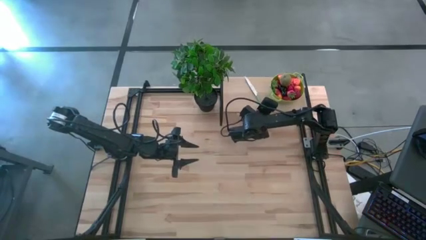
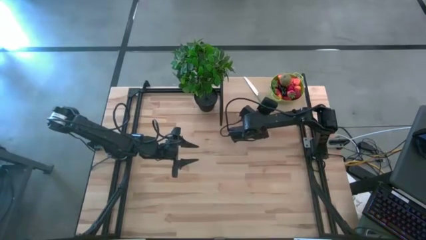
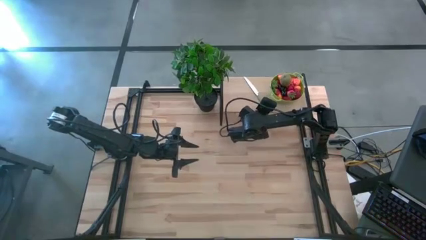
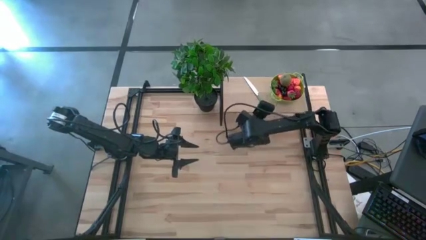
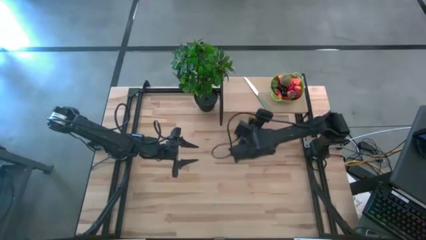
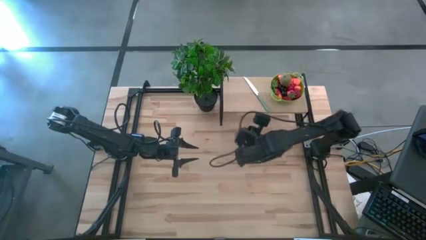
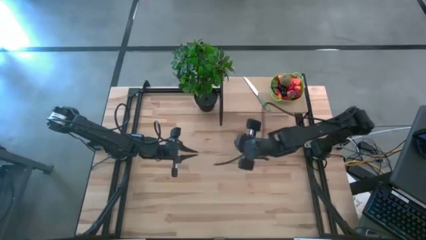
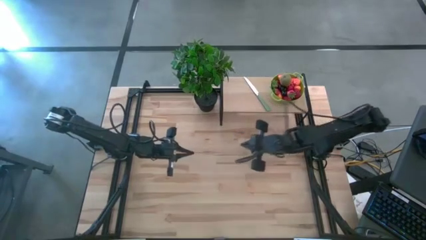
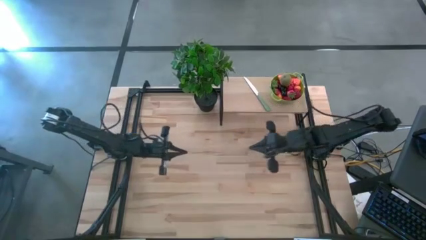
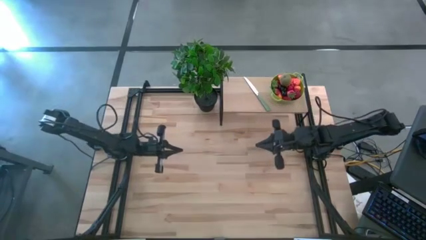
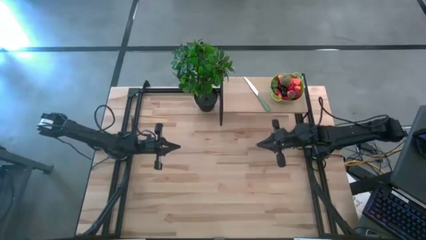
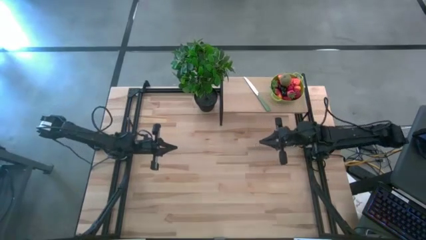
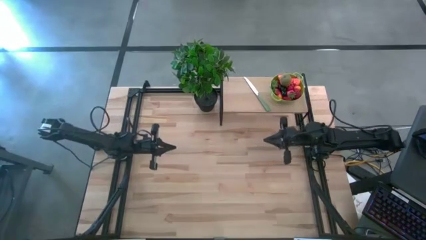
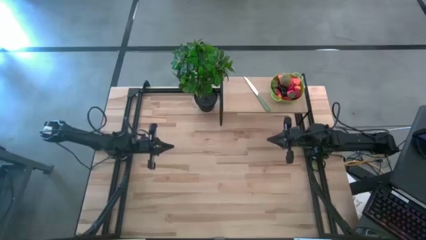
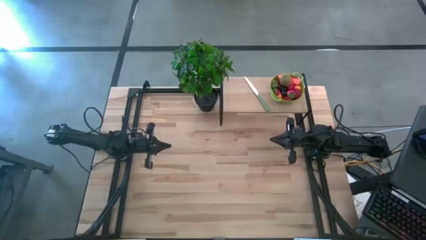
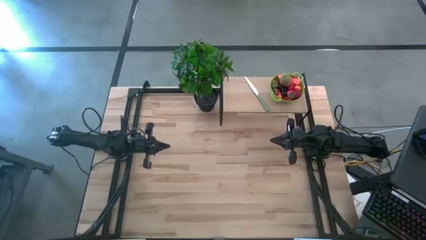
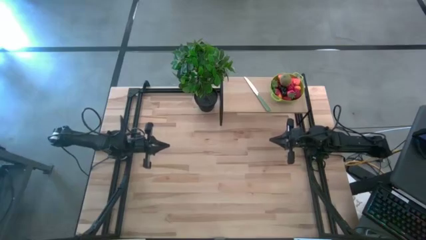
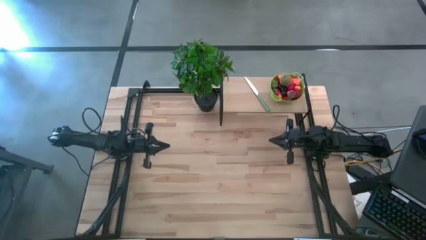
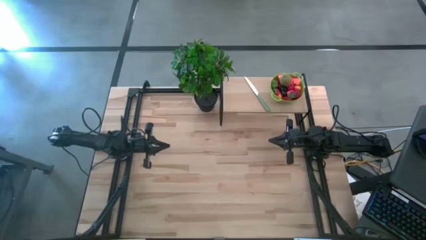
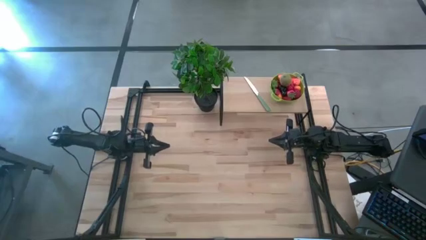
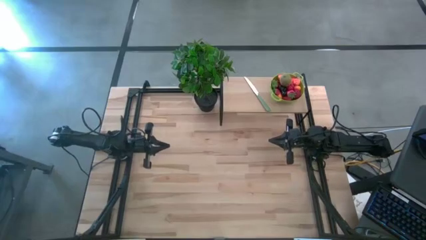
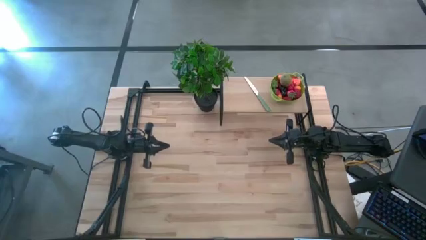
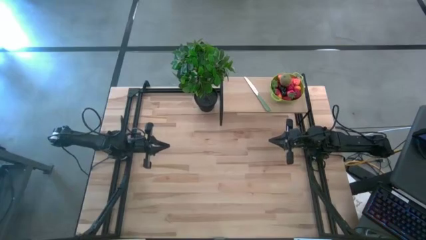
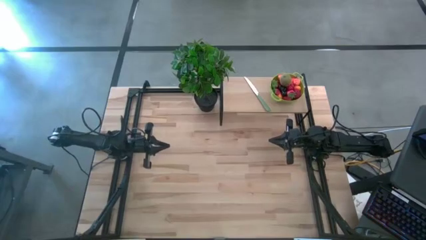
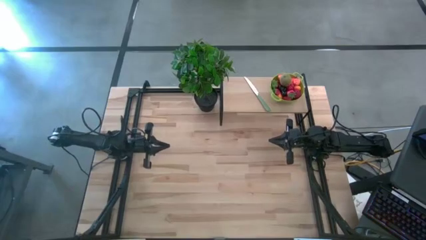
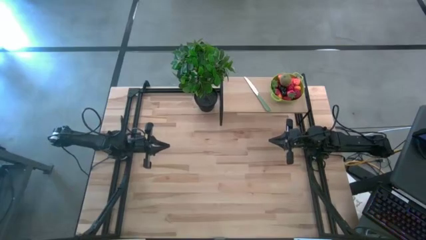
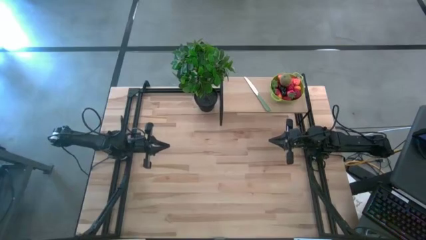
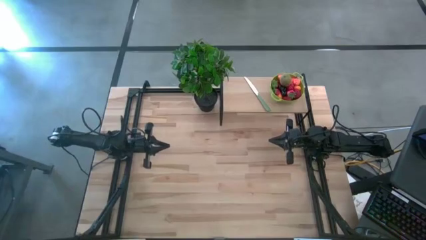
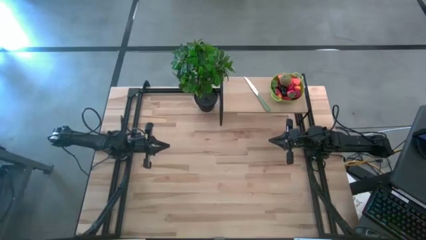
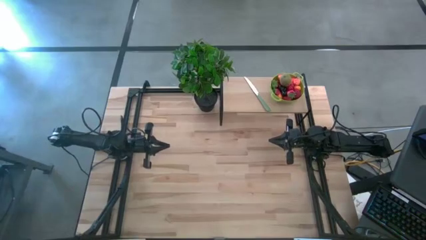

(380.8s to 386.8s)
Task: Pick & Place Fruit
Return to Home Position

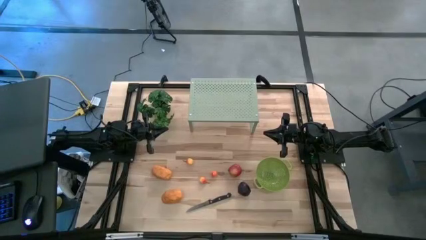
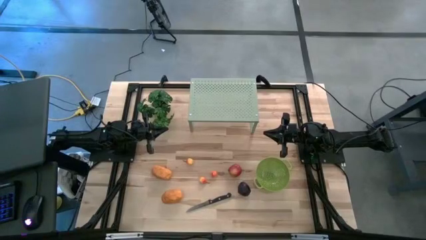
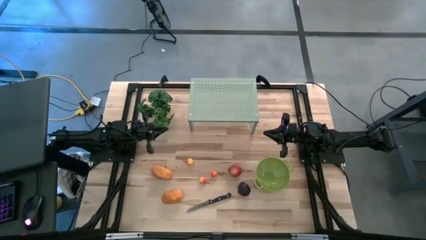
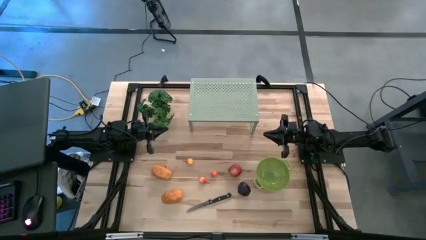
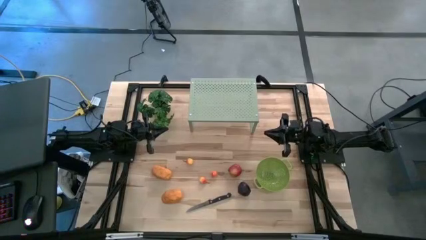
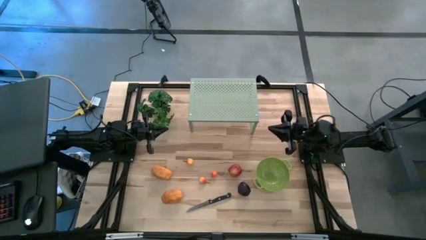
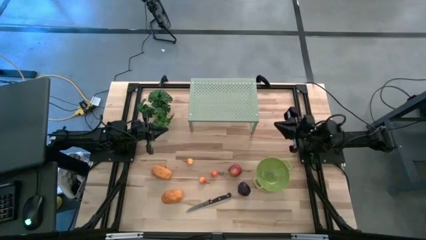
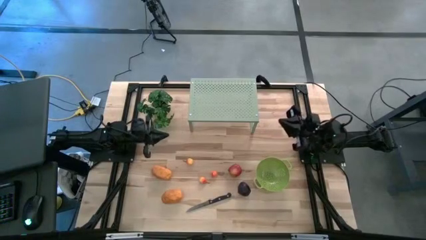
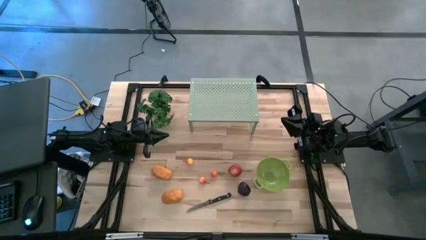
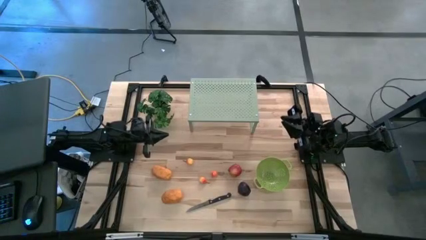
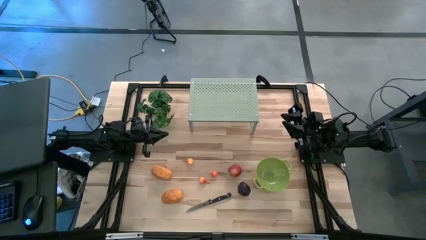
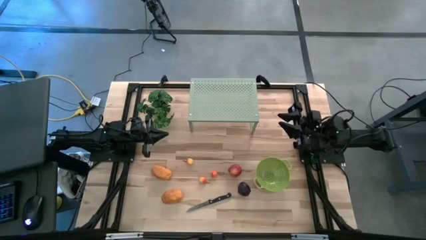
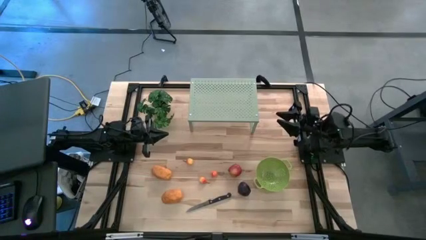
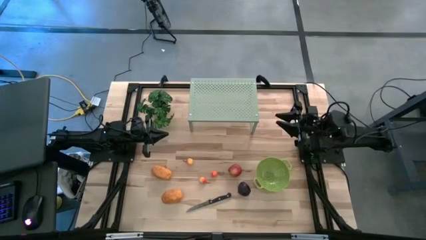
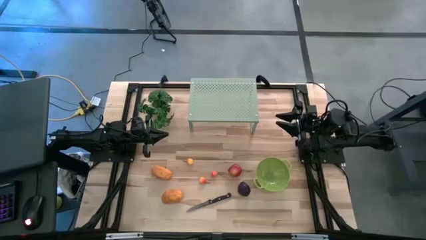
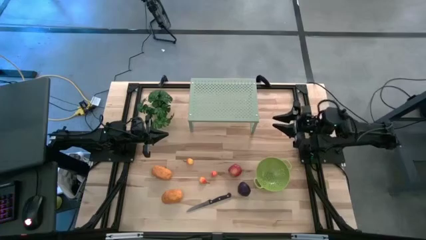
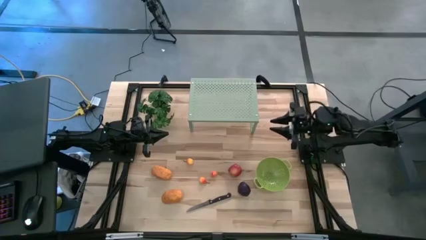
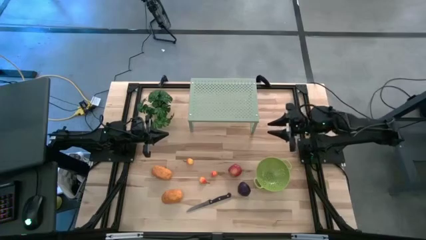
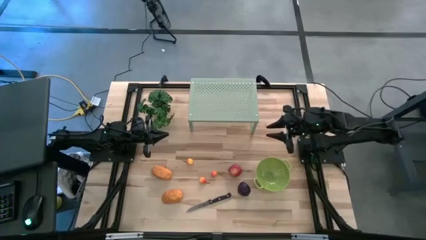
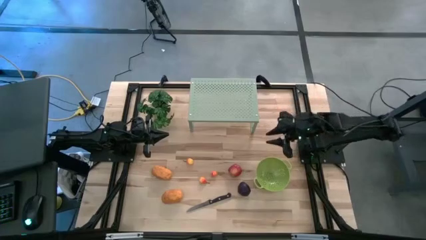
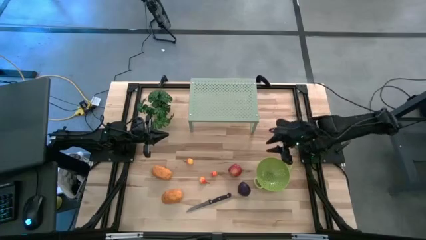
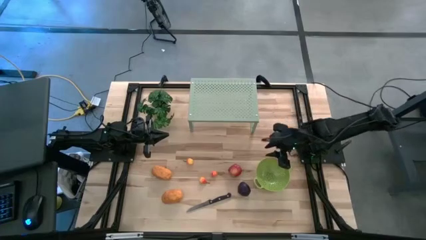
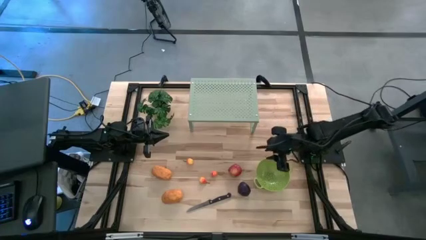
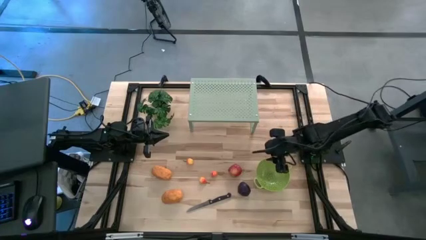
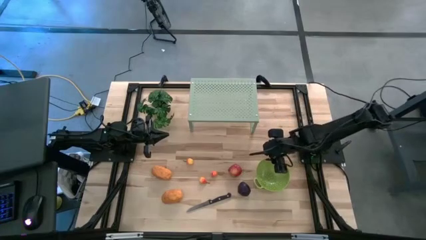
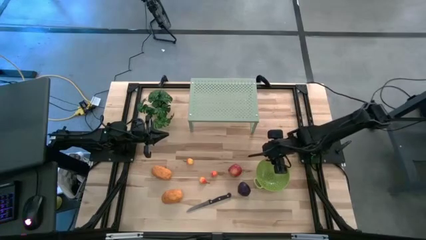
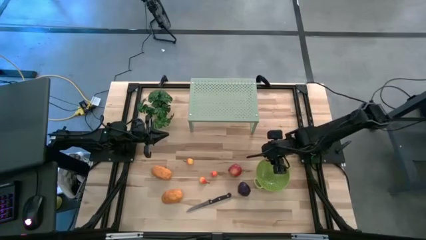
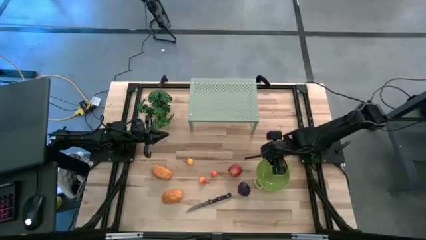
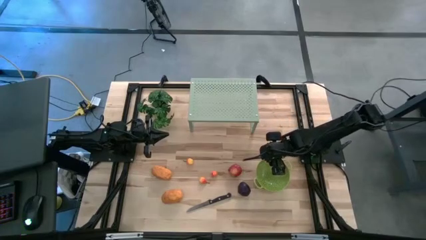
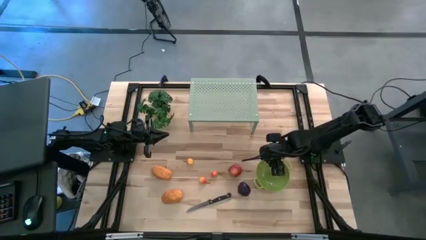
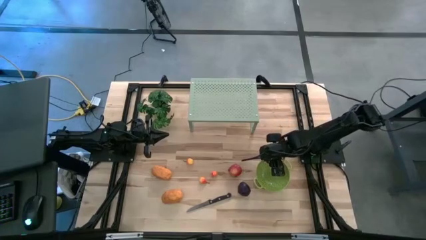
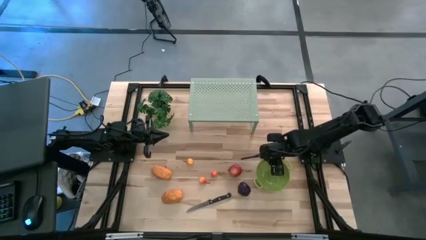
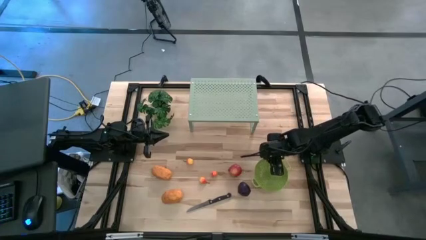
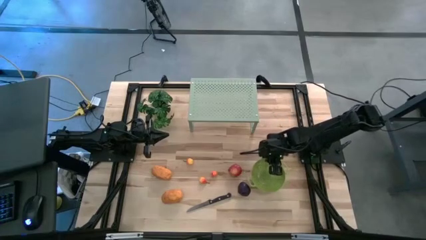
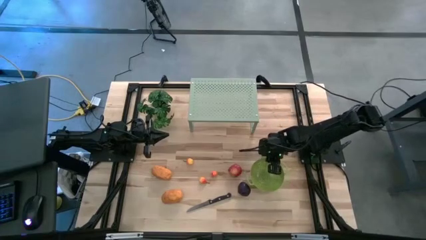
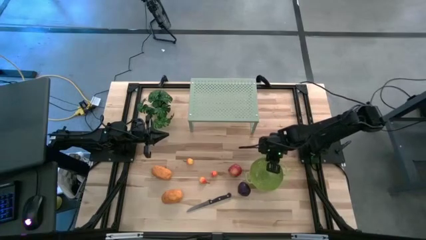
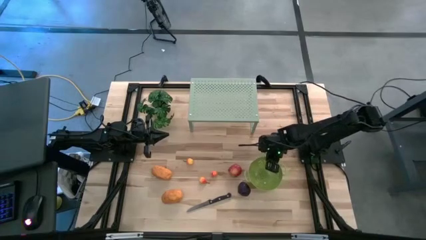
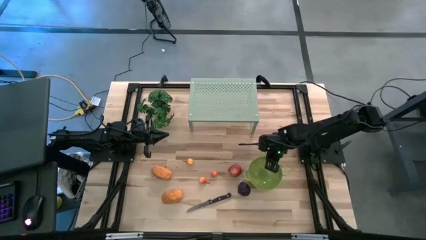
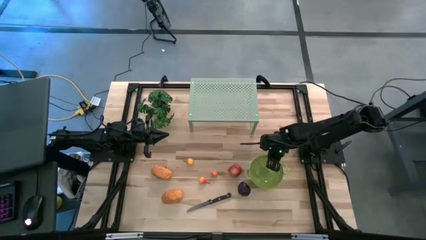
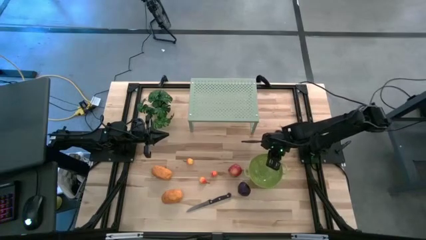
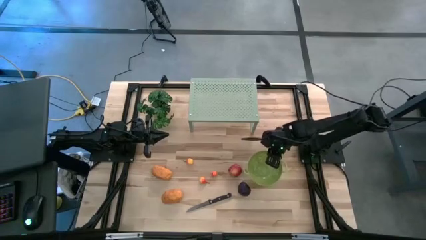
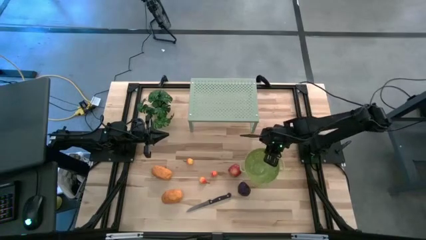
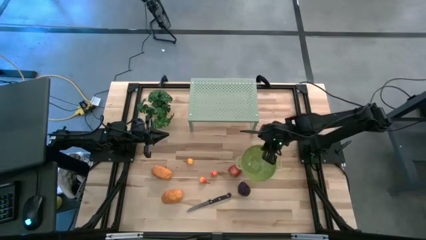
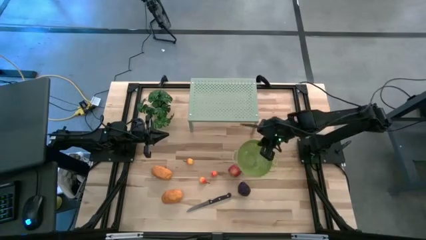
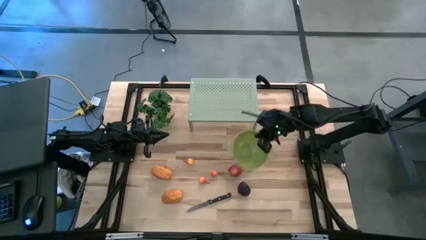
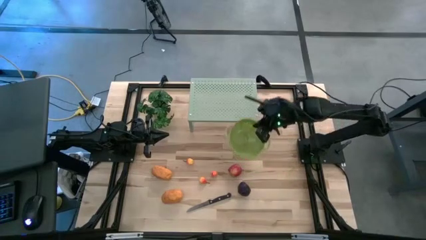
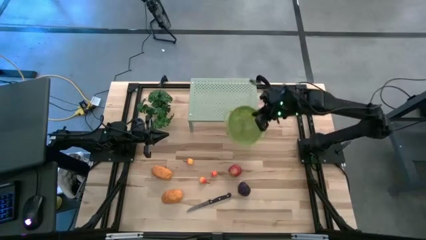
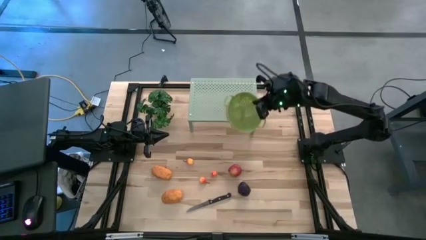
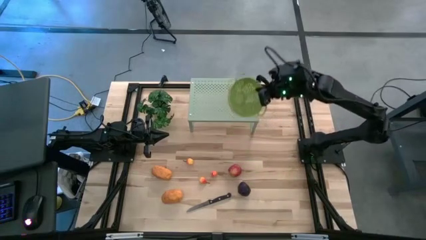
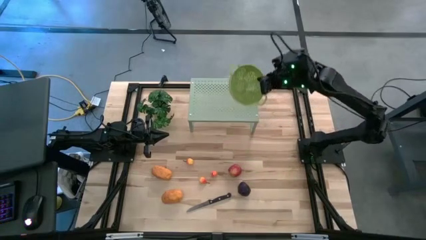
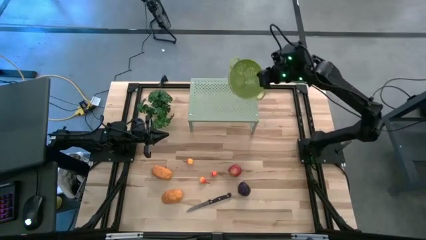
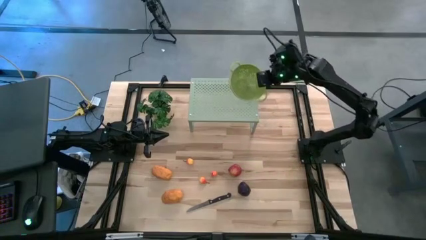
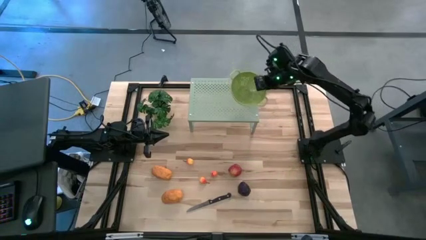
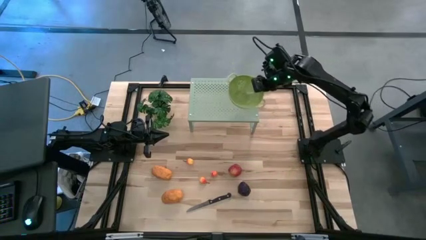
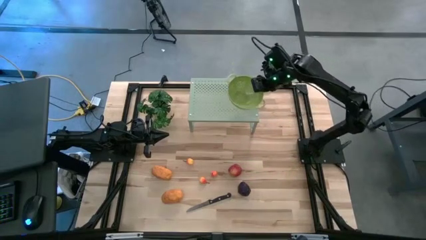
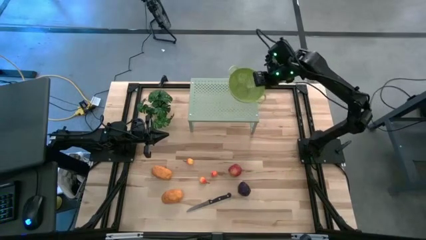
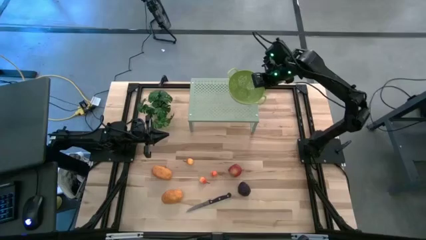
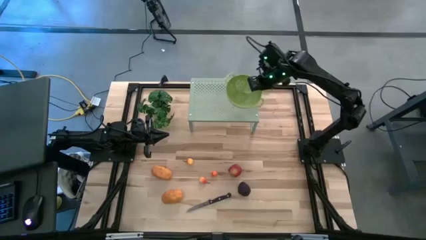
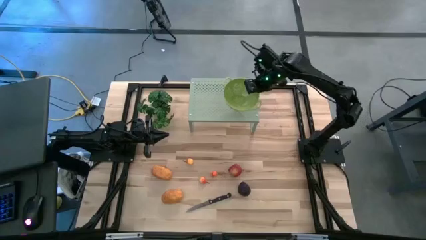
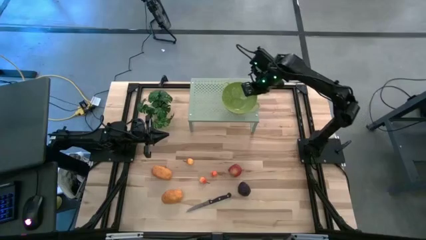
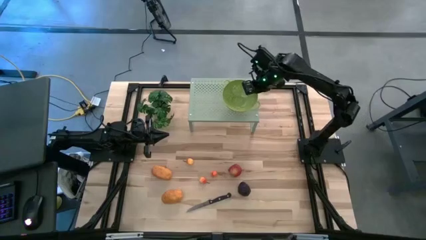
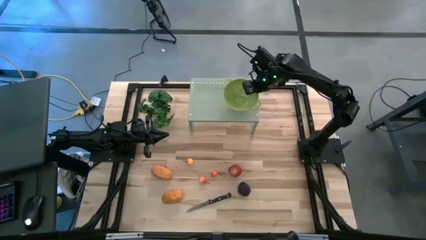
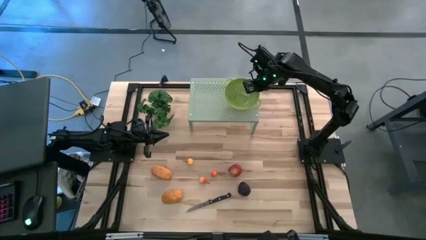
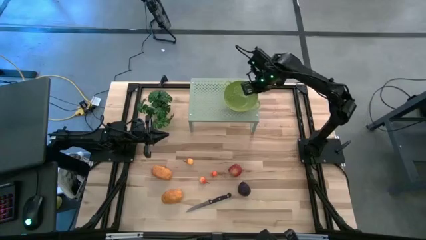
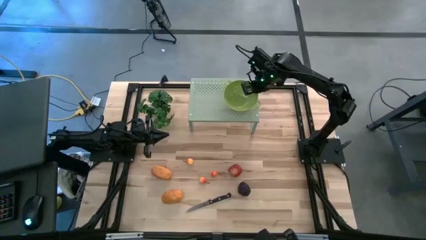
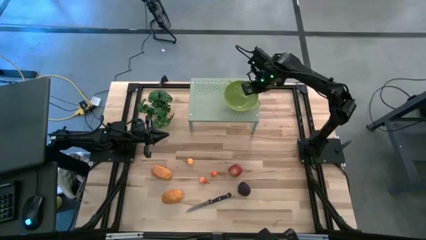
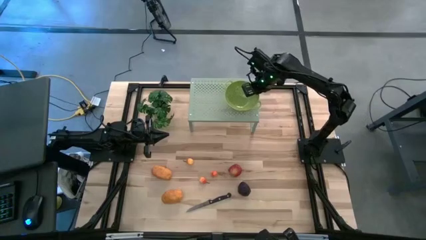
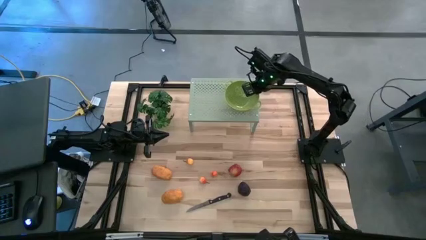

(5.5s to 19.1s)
Task: Pick & Place Fruit
Put the strainer bowl on the shelf
